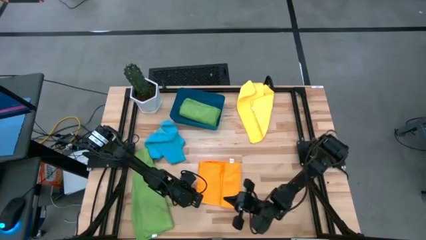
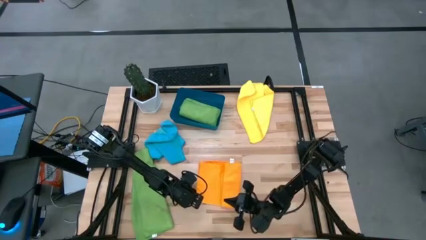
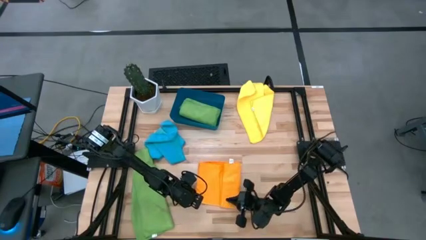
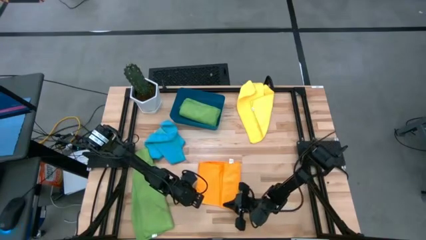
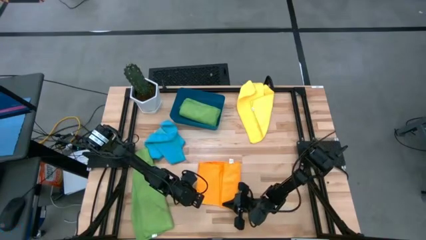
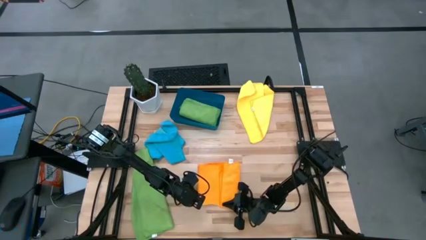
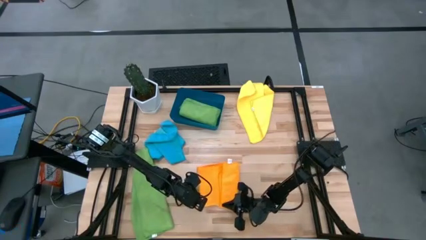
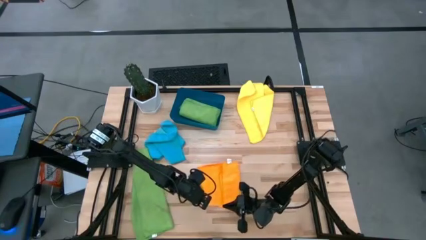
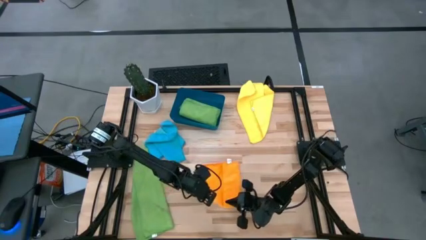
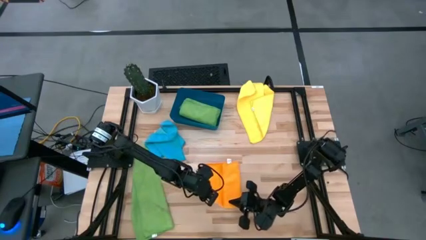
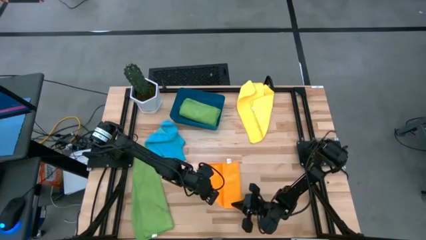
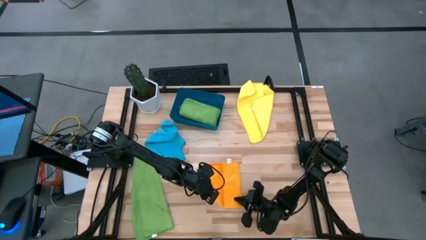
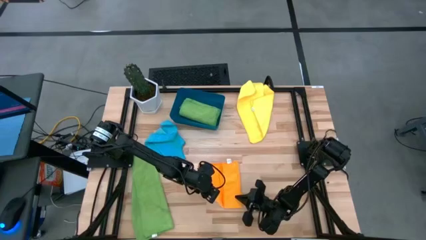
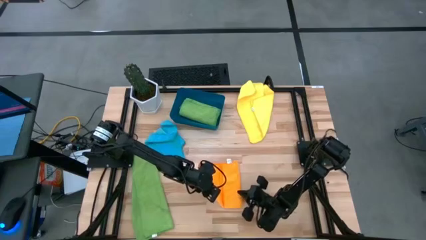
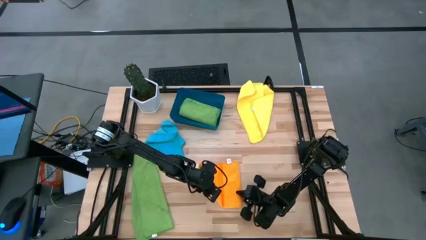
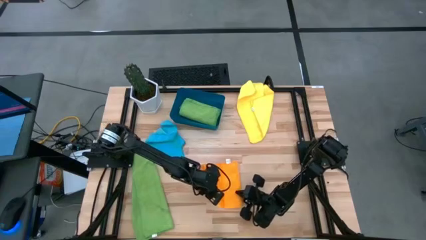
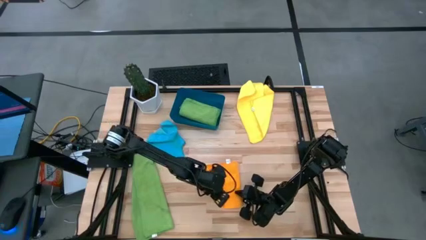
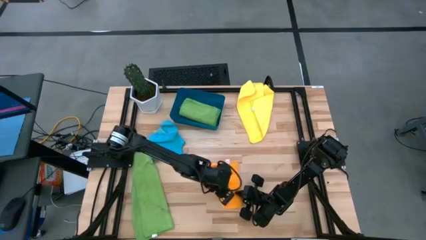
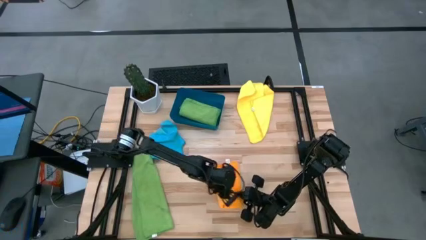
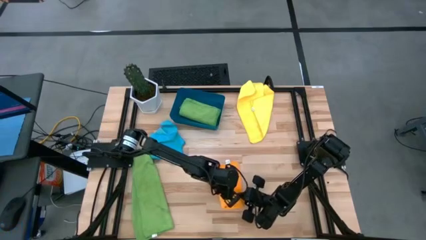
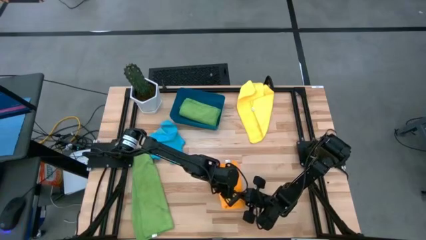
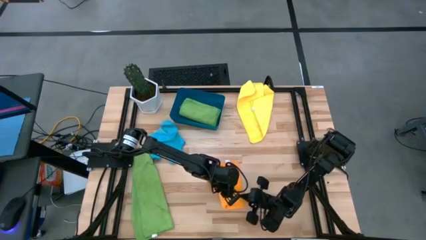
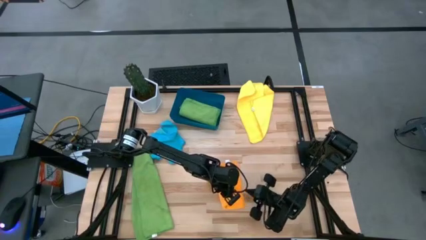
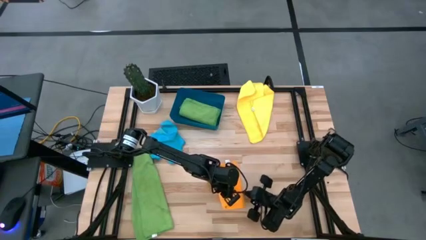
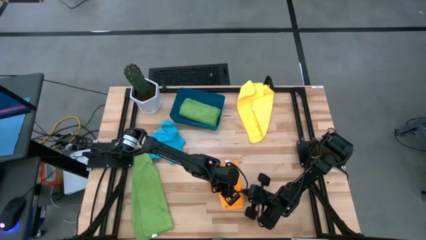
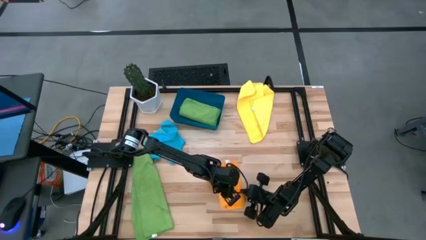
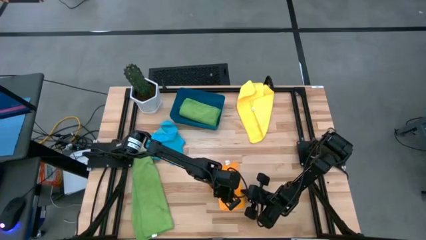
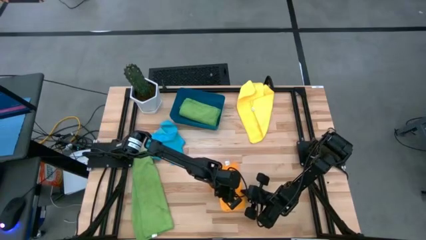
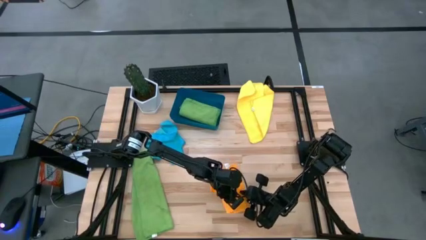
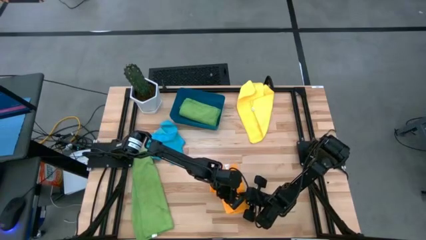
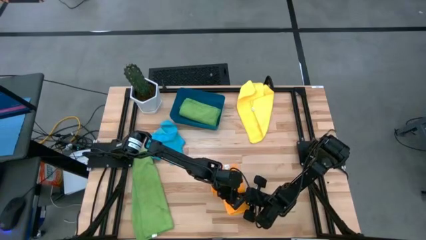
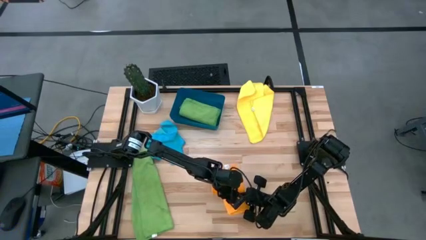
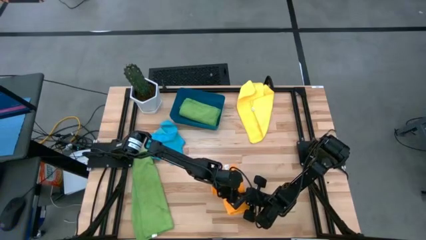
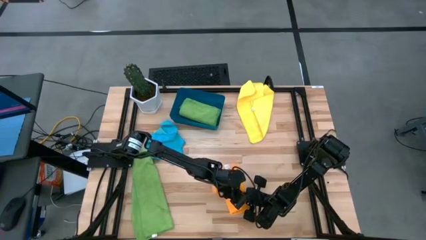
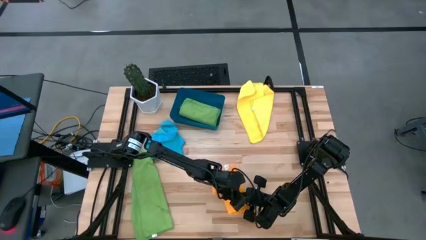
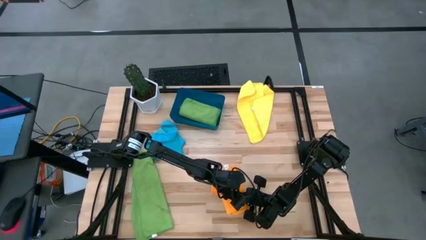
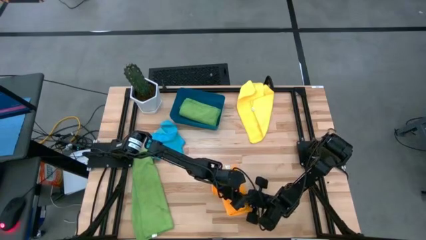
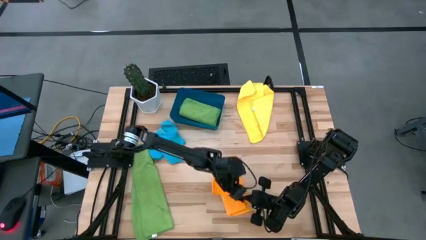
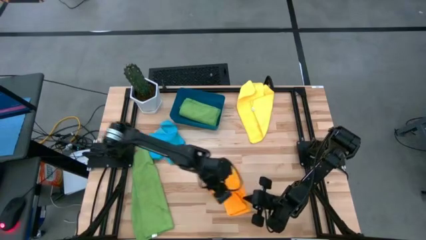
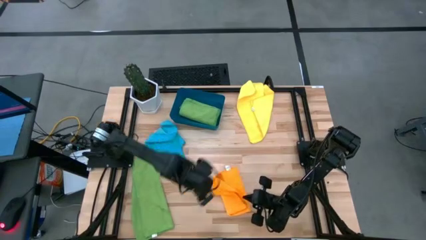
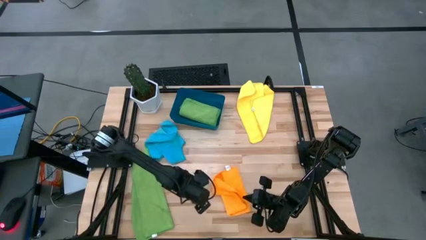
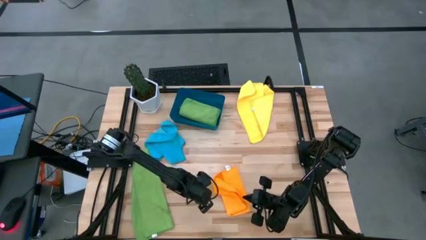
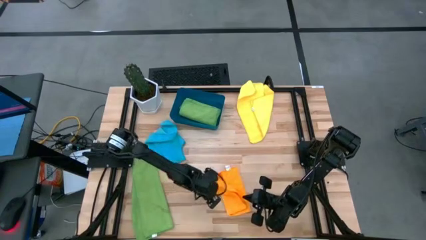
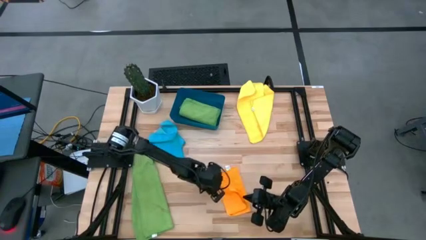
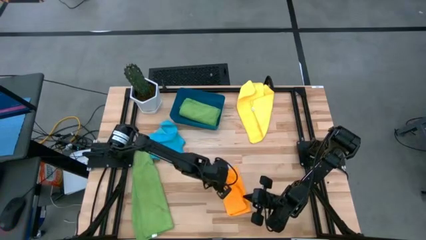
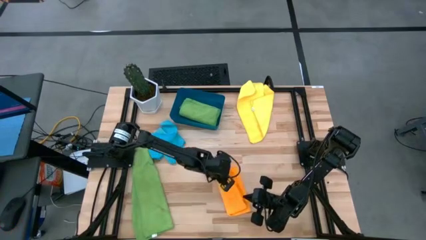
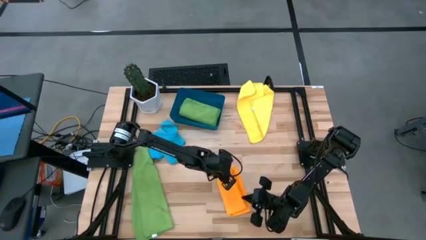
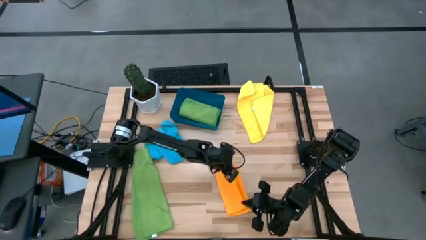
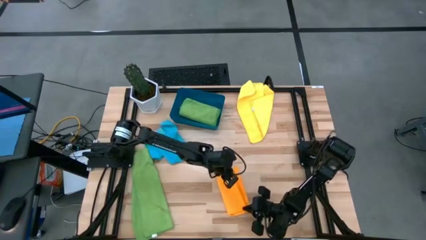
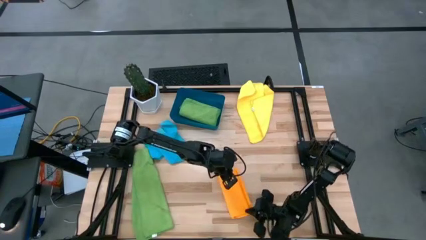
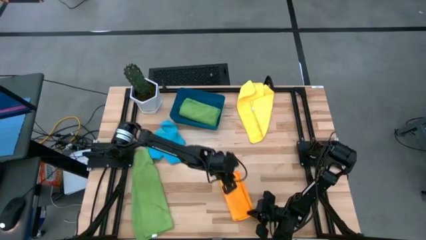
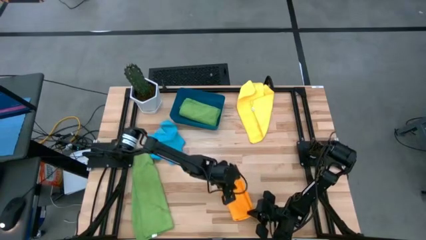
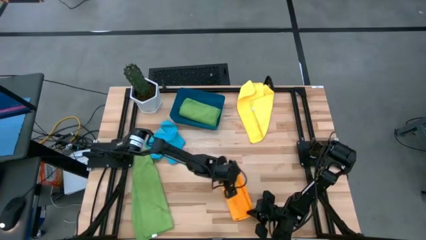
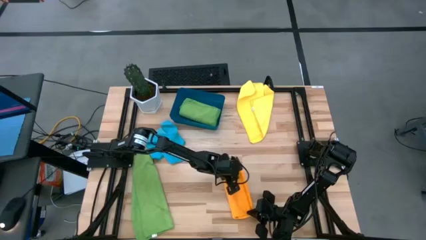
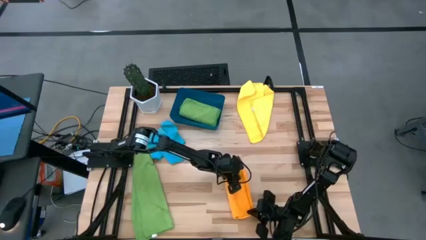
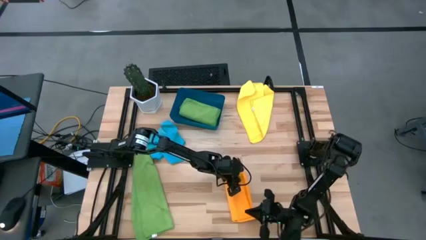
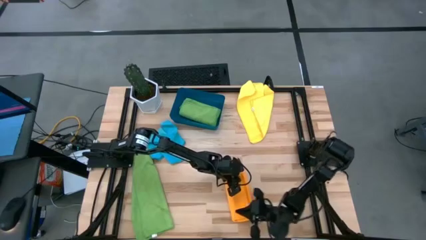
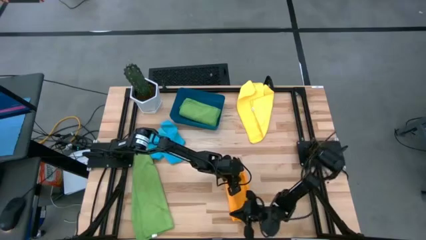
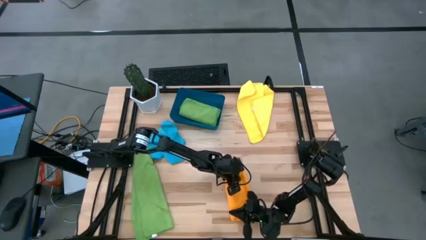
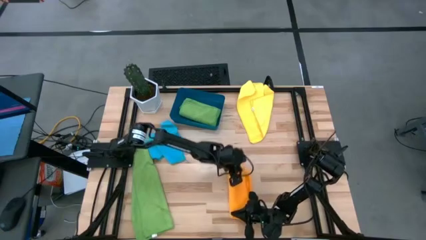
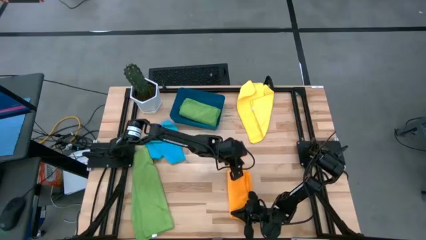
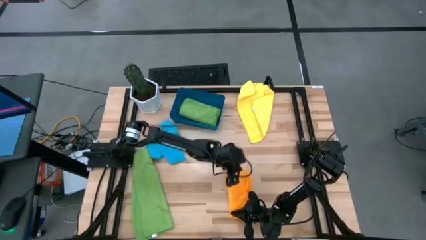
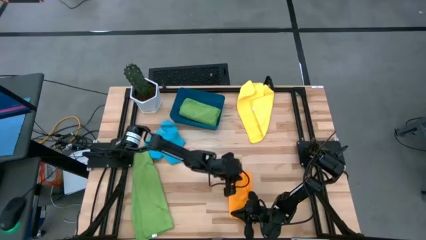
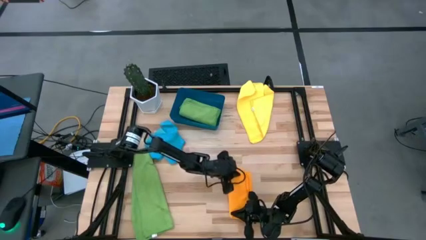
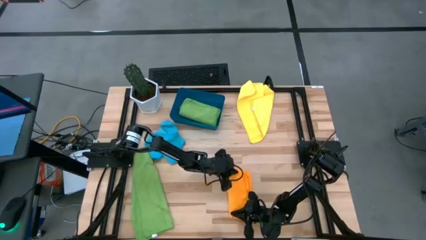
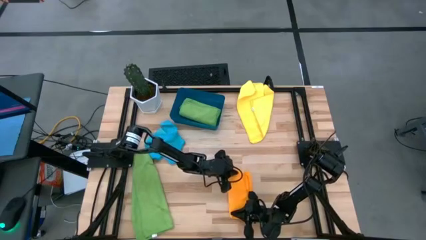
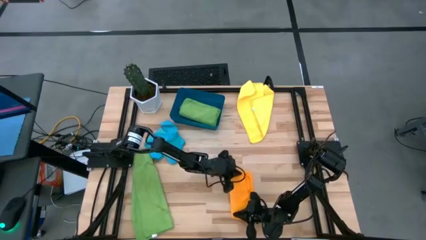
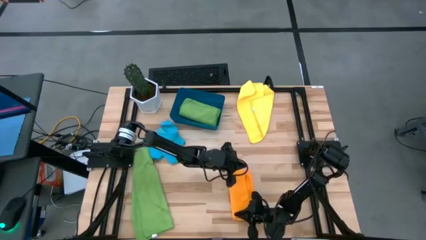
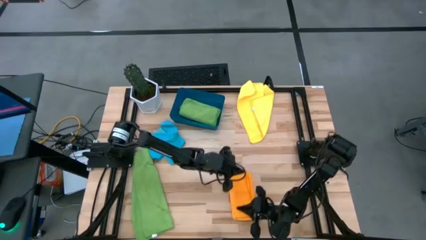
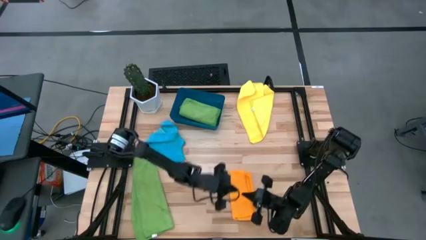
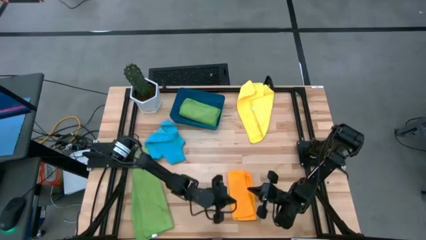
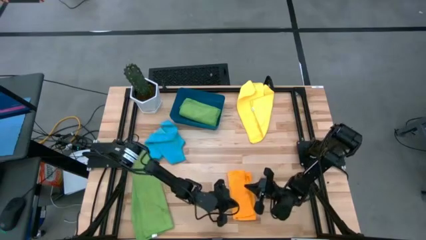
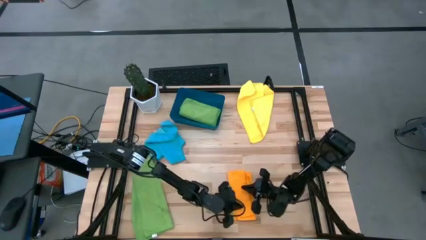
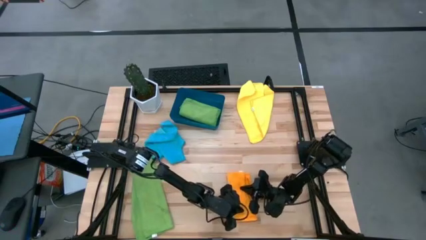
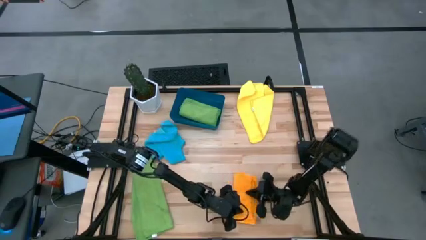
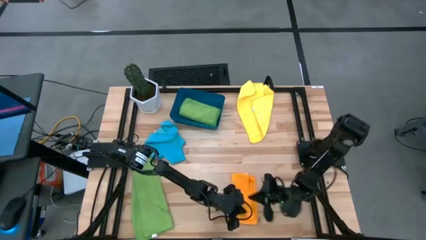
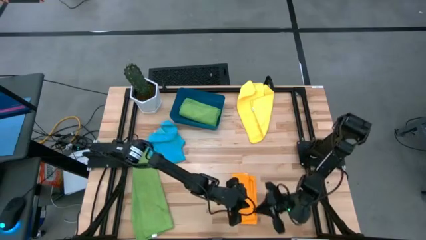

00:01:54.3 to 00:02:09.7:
Task: Fold microfiber towels
Fold the orange towel

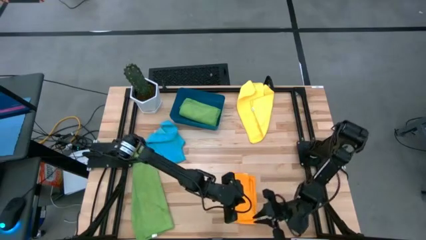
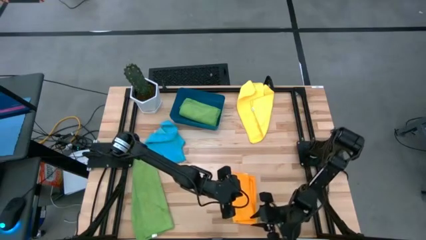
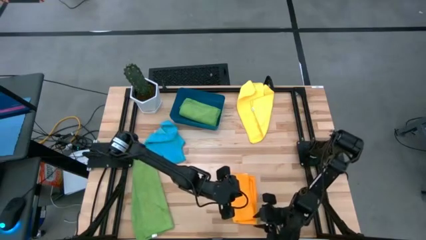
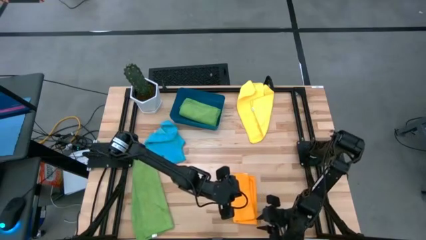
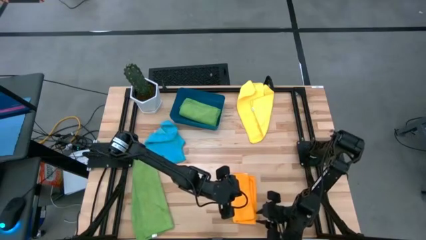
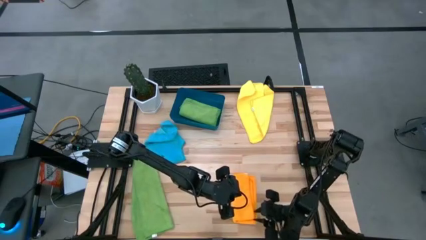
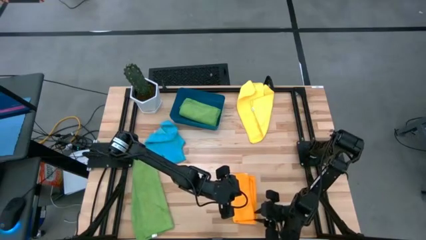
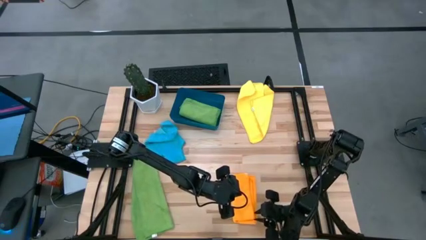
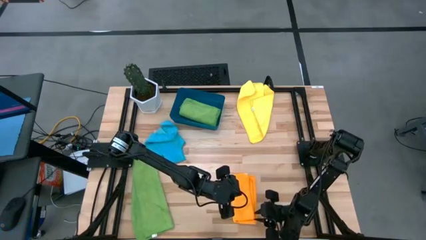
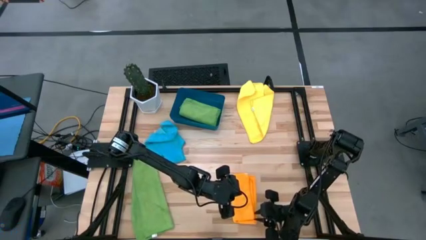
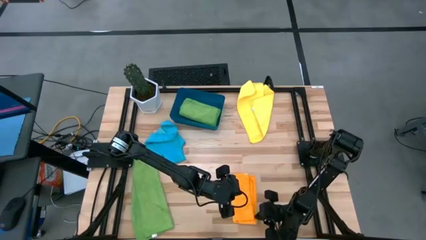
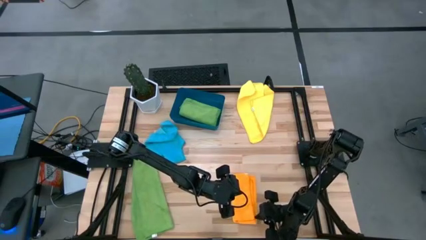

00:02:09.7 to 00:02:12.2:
Put the orange towel into the blue bin
